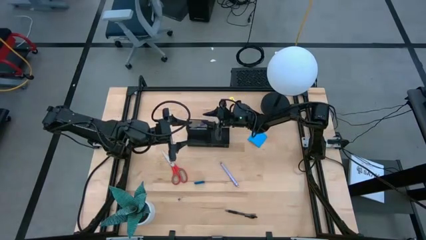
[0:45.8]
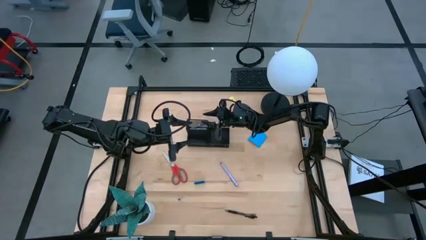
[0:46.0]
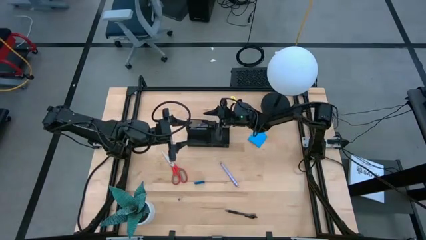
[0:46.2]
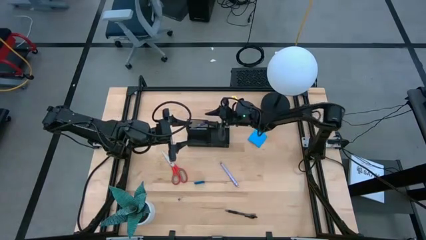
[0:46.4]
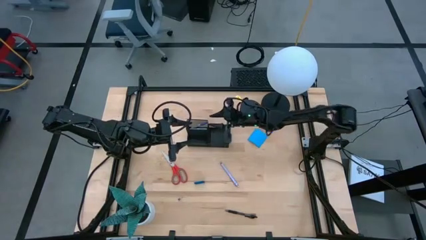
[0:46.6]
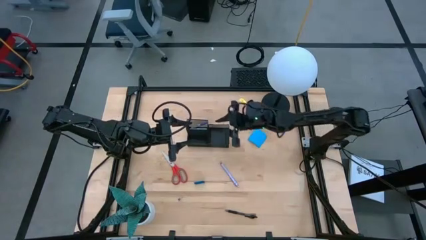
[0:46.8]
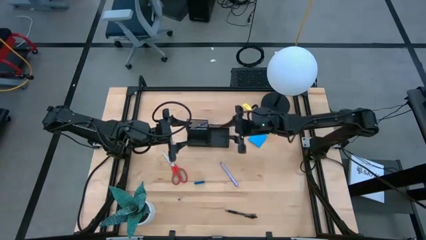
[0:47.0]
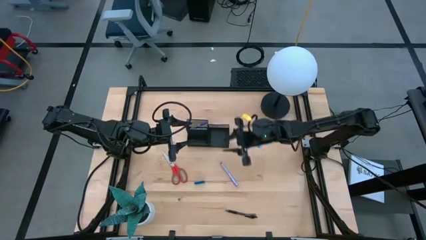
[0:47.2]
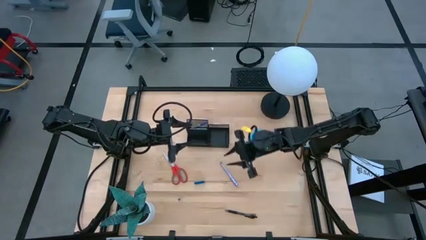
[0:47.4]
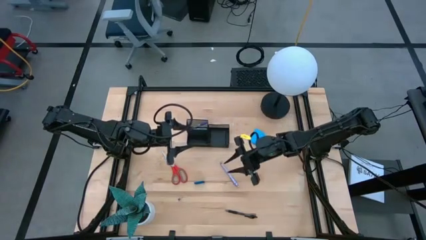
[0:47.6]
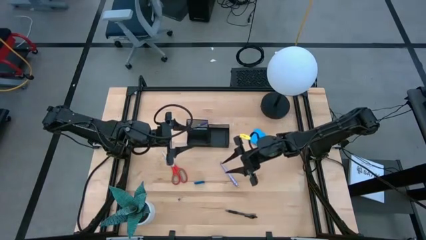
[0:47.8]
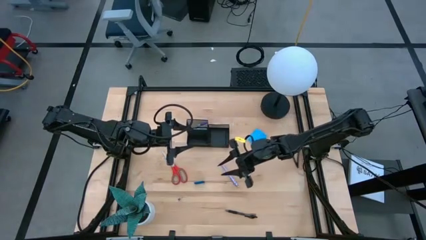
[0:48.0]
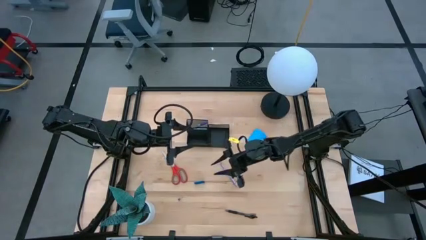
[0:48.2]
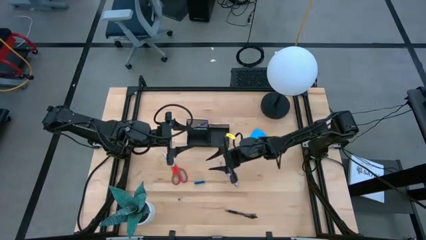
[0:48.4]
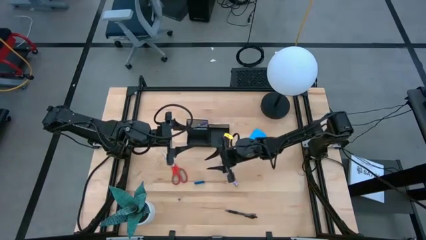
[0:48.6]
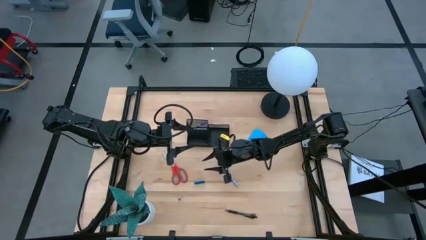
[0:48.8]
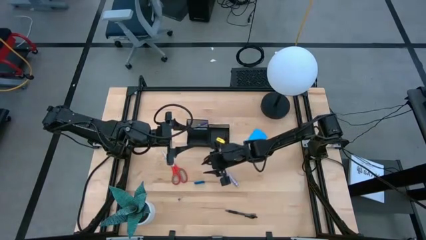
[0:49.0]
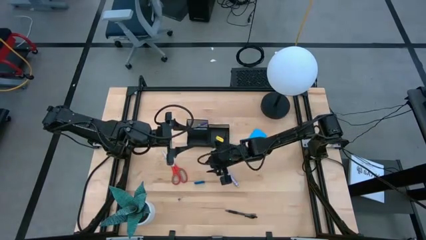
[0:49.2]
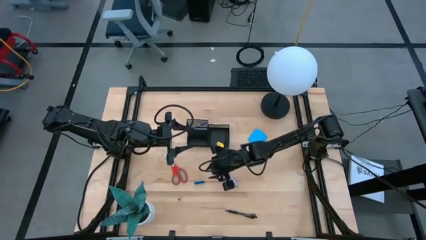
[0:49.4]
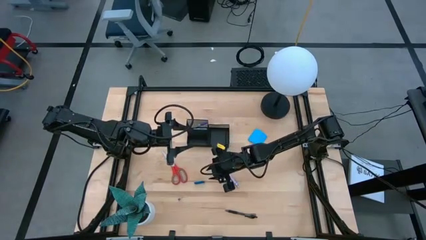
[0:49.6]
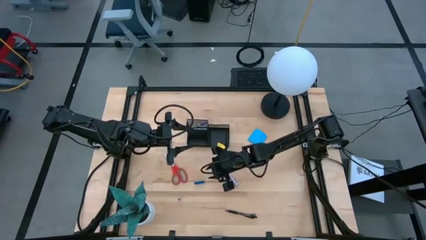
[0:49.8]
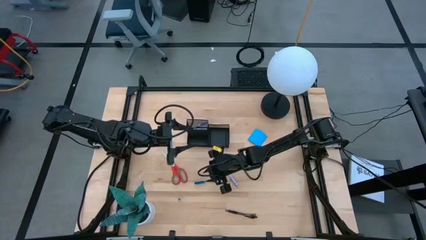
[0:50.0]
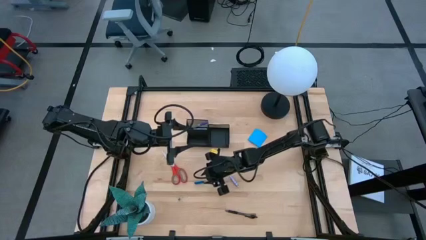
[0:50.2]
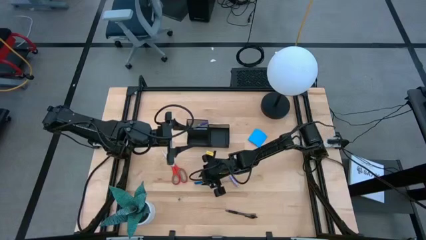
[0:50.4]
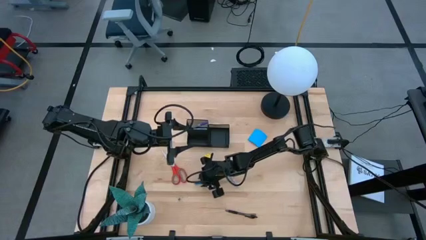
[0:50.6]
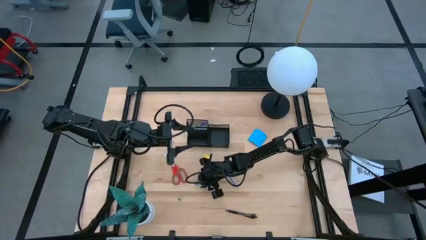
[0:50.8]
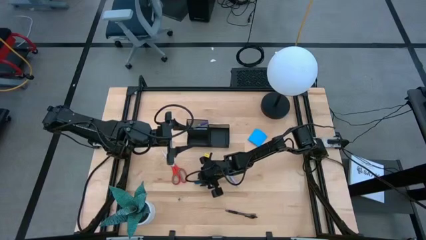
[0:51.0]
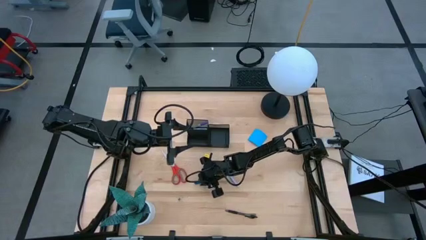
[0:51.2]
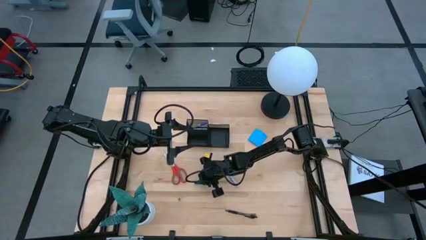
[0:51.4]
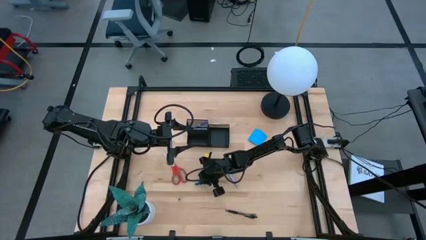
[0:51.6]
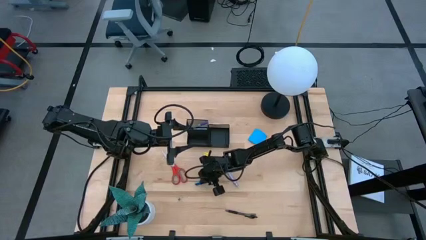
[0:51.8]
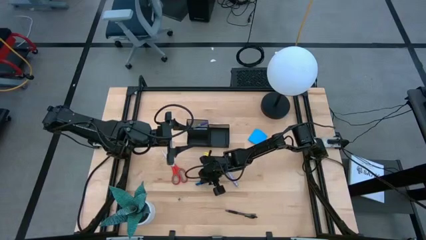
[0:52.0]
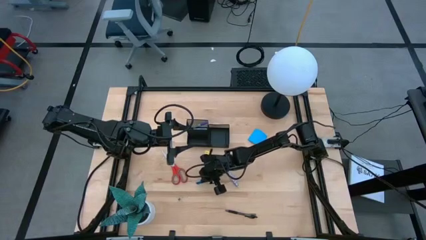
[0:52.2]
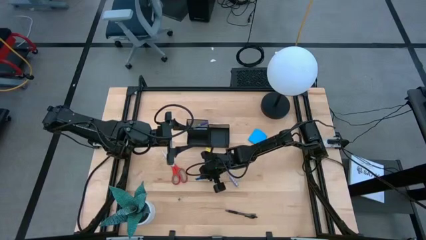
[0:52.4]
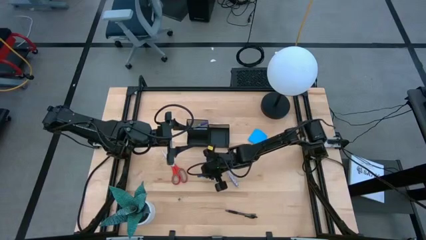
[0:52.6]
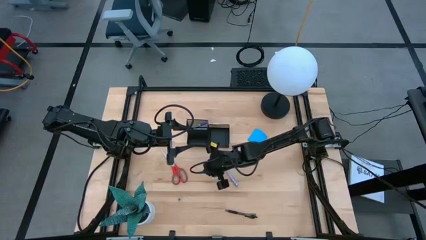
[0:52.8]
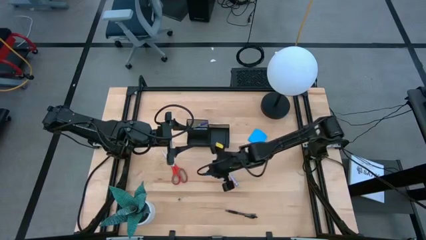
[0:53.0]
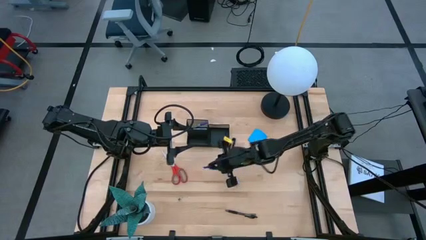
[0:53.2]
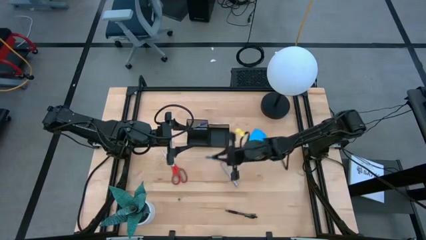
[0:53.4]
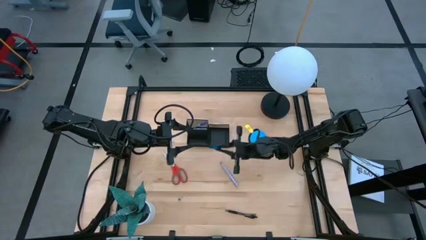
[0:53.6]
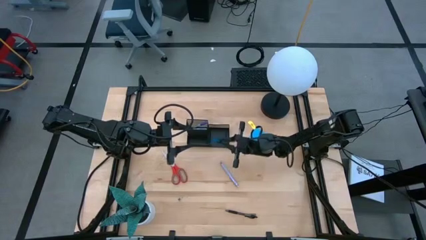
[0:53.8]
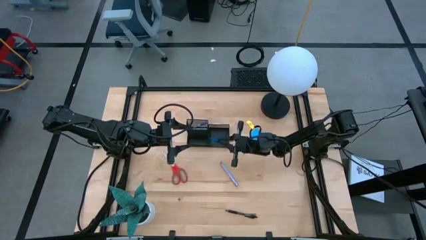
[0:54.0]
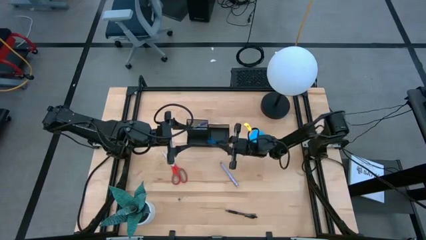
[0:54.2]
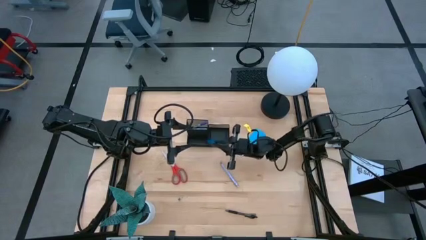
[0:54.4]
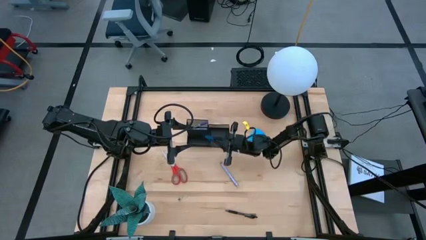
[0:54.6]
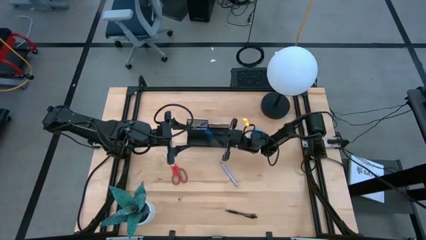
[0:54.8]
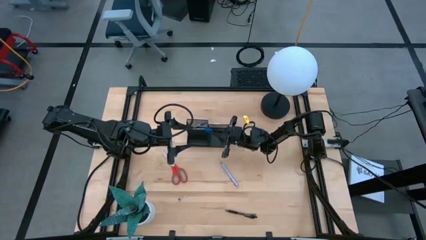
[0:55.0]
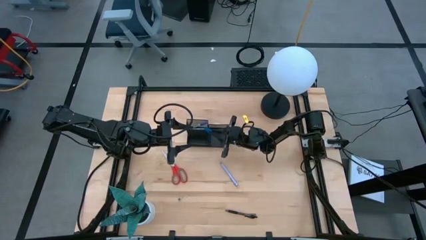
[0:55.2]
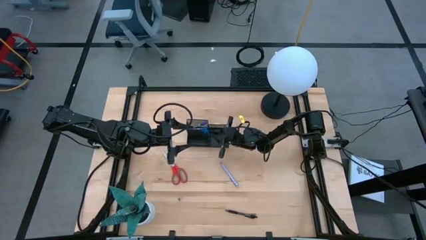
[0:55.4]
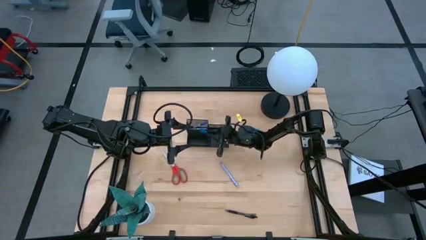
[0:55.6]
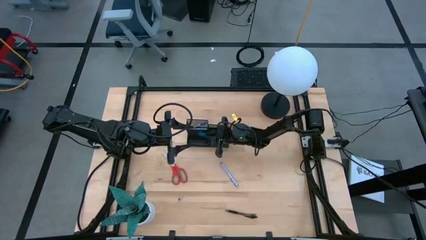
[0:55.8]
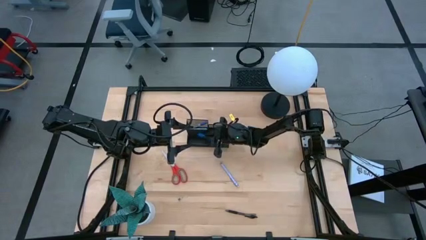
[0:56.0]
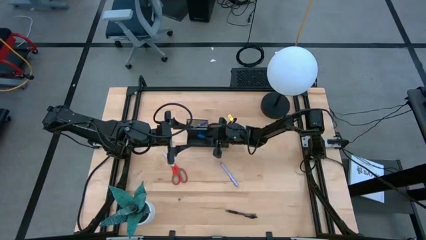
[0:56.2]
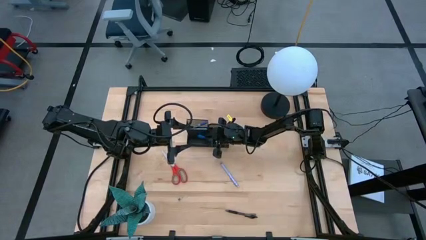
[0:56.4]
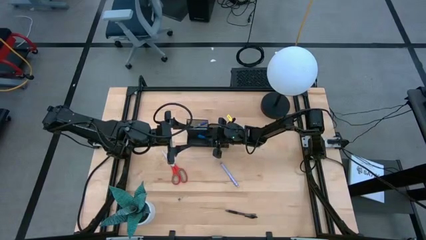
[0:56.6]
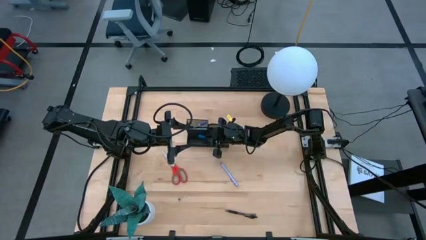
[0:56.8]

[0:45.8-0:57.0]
Task: Pick and place office supplies into organizer
Put the blue eraser into the desk organizer

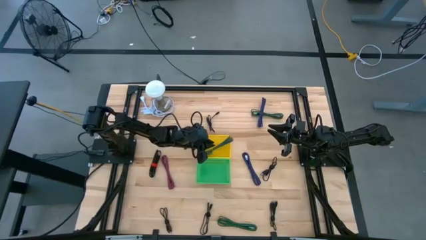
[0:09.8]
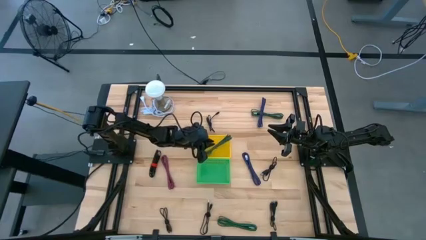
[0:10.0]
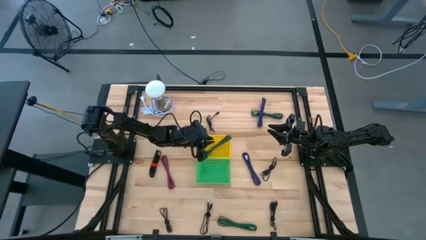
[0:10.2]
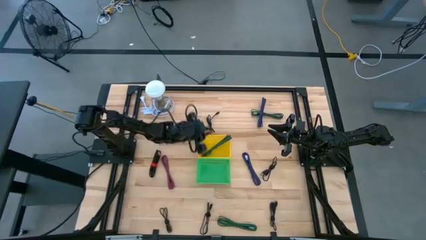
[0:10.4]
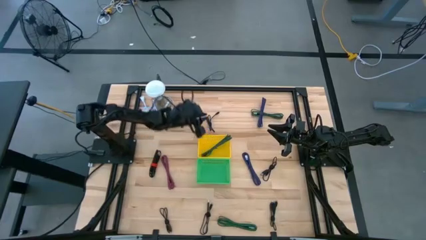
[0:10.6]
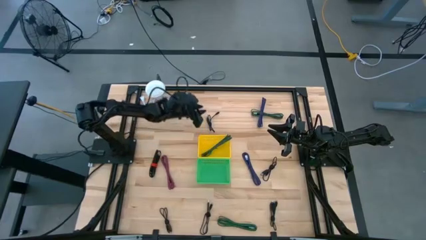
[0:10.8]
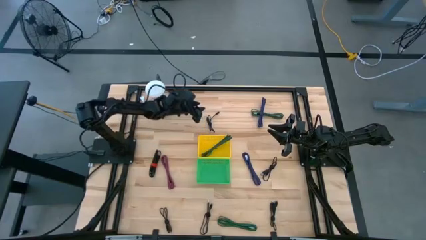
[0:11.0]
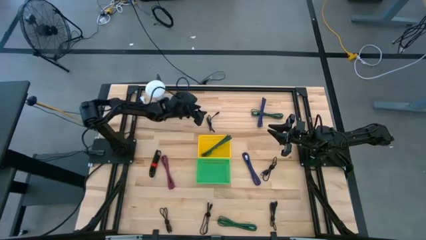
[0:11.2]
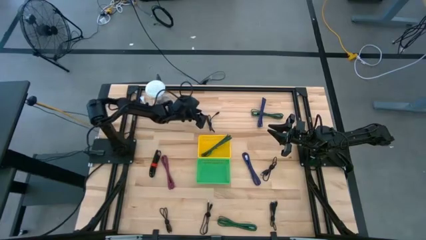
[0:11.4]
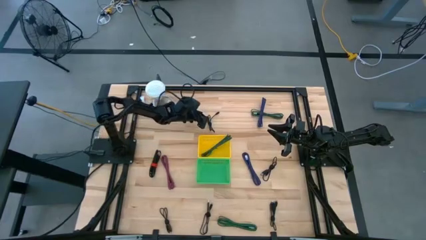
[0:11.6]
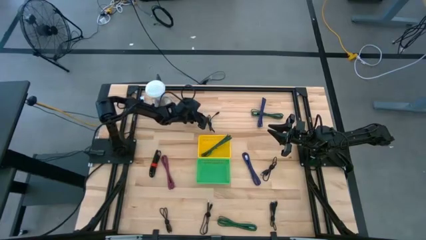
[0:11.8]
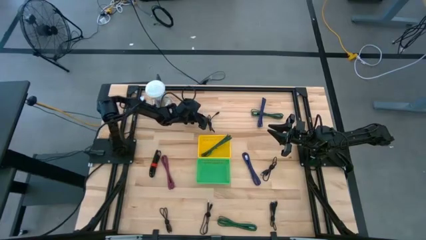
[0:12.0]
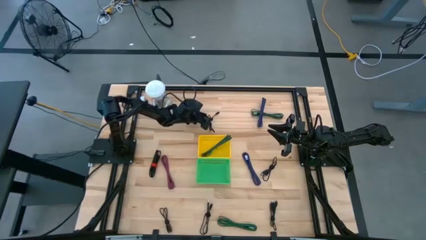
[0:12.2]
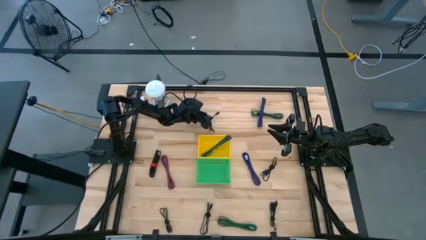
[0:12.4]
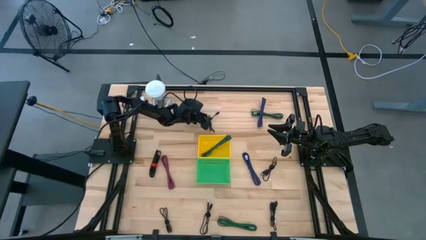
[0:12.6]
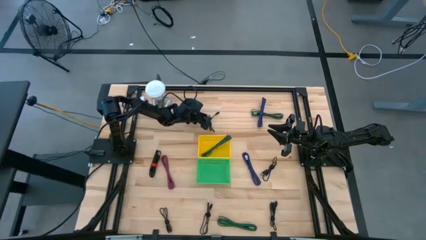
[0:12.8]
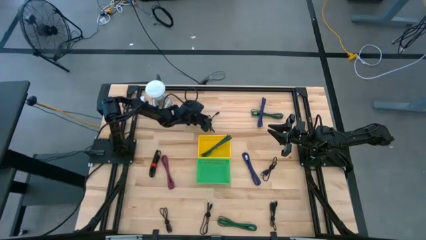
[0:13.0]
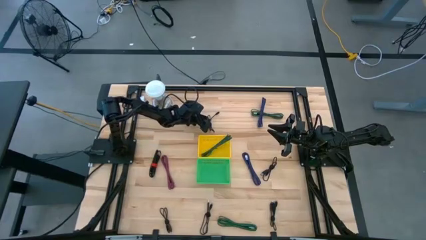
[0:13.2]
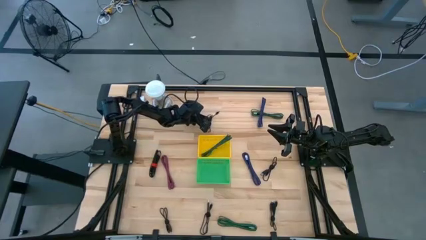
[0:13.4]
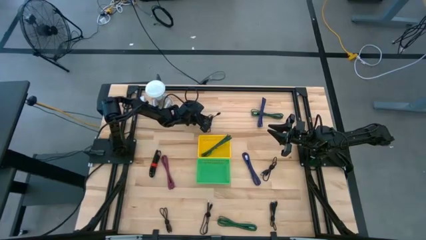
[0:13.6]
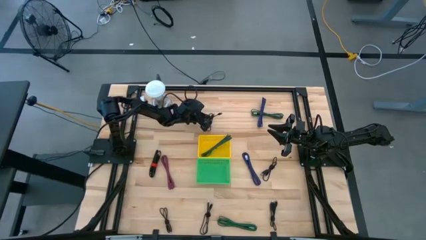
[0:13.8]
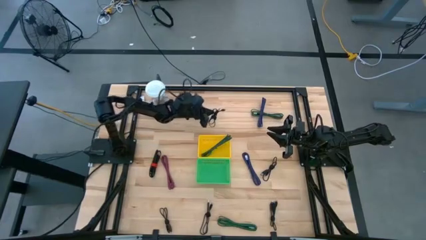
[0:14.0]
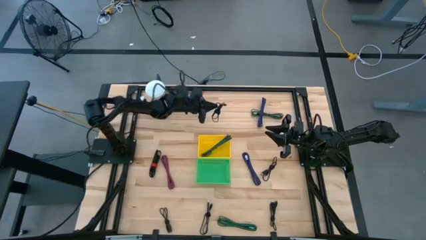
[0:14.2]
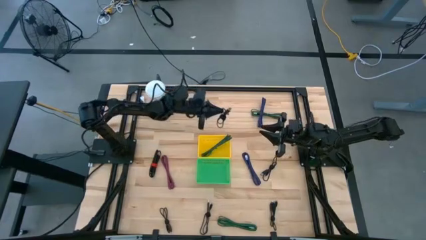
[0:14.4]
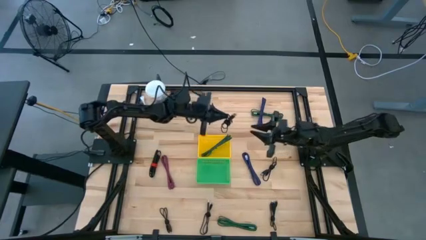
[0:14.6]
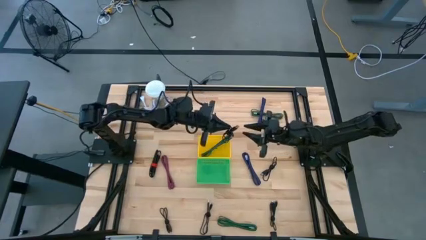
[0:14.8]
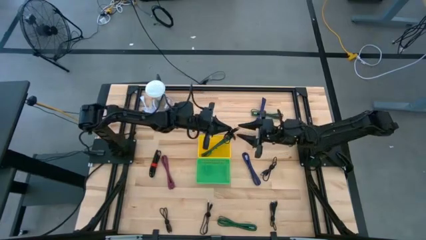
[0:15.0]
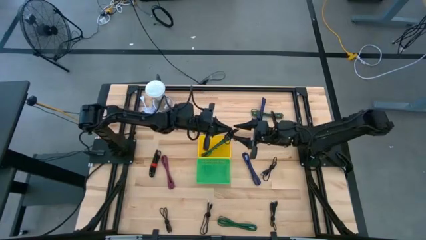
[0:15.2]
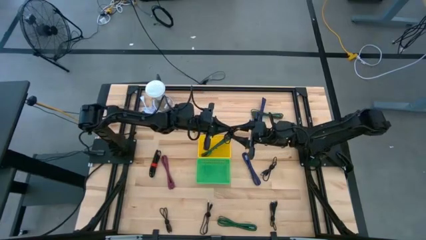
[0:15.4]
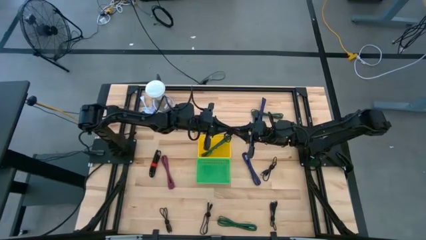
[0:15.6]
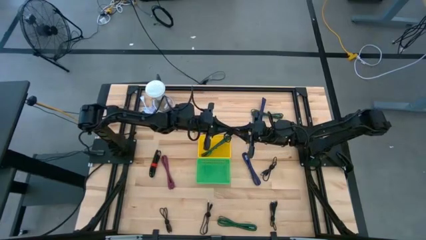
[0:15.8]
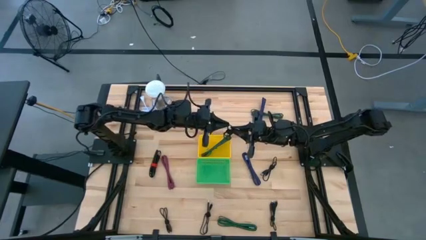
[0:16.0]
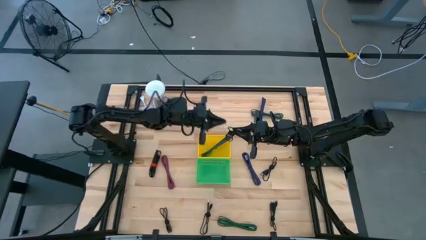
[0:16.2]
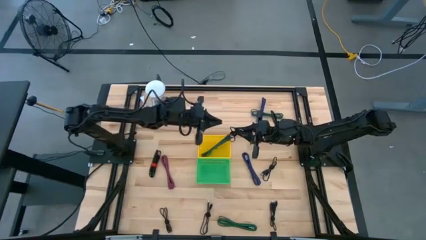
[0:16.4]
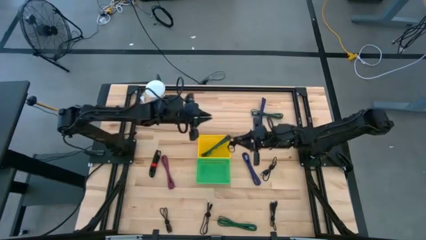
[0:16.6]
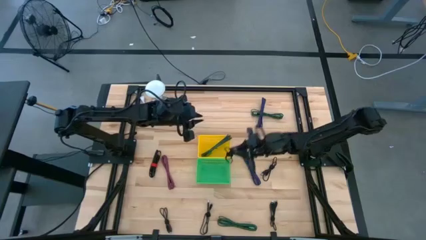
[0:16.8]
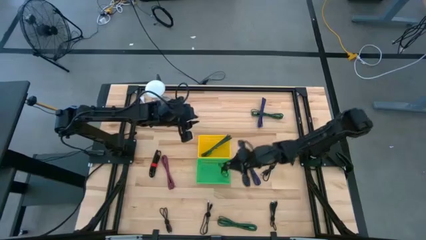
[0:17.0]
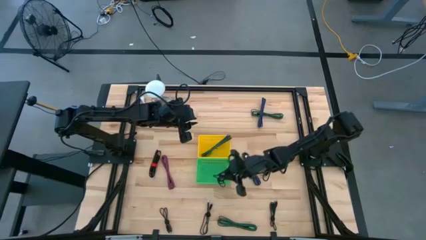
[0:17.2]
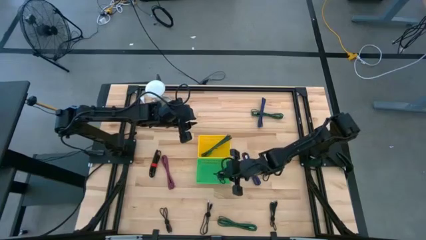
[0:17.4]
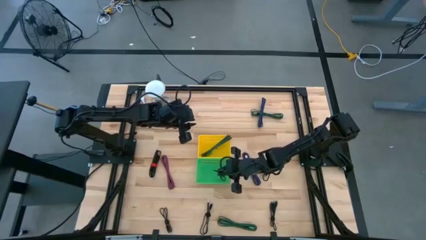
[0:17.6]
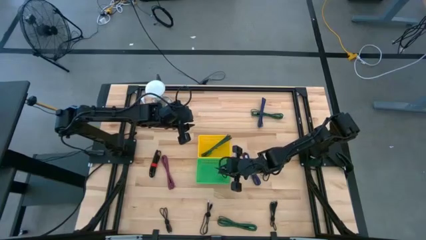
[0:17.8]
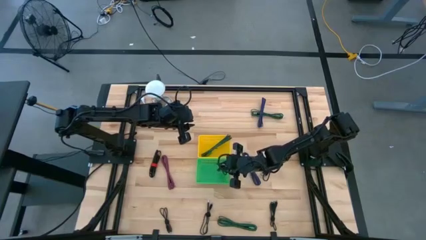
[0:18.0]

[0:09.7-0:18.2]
Task: Pick & Place USB Port
Put the black USB cable into the green bin
